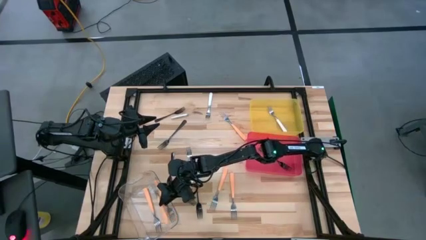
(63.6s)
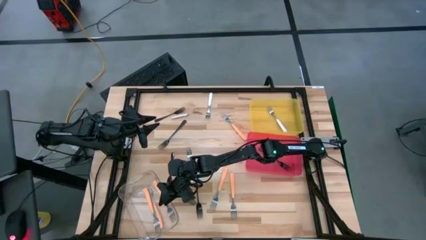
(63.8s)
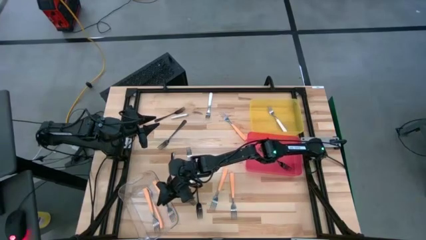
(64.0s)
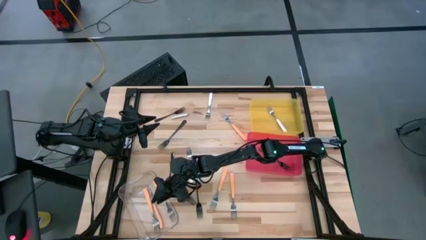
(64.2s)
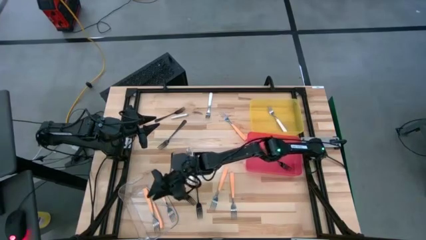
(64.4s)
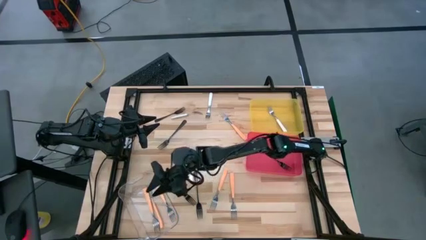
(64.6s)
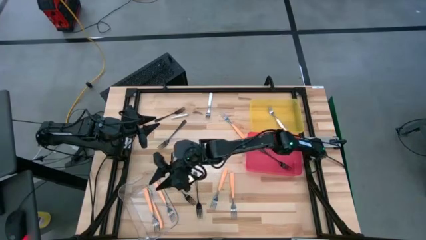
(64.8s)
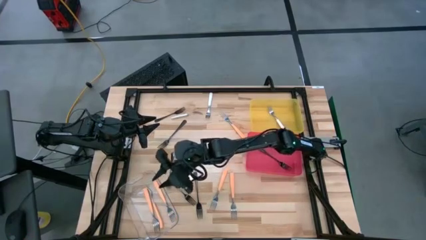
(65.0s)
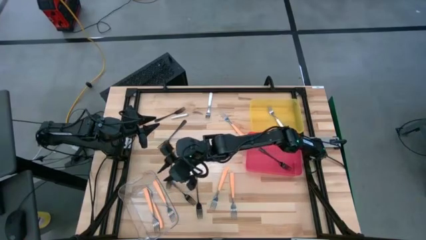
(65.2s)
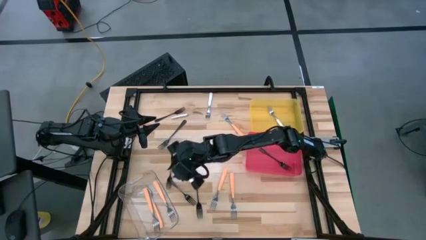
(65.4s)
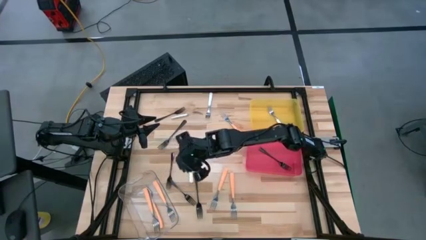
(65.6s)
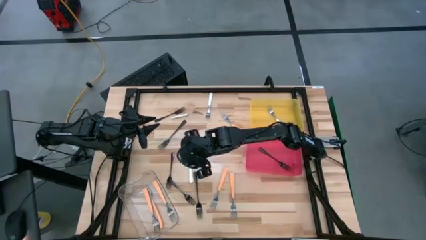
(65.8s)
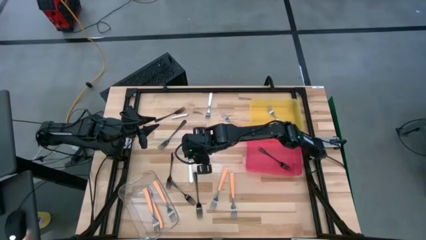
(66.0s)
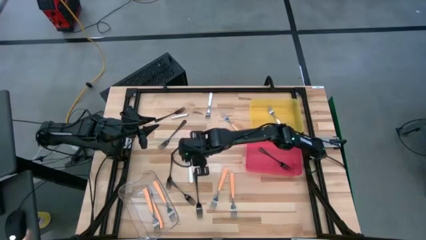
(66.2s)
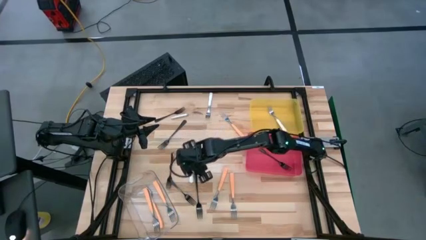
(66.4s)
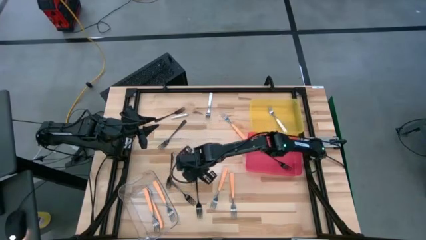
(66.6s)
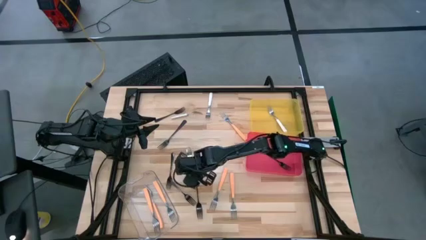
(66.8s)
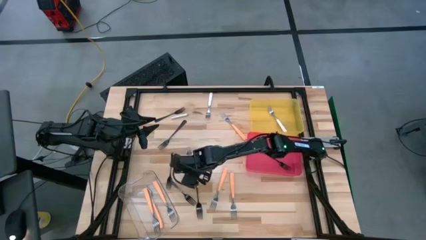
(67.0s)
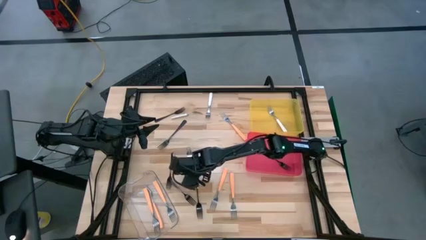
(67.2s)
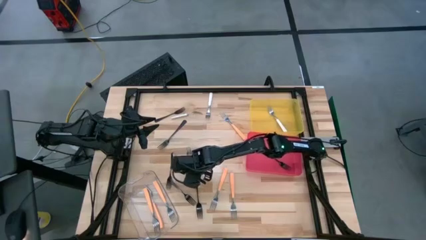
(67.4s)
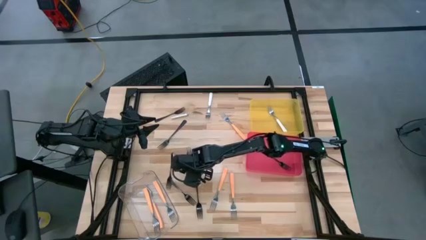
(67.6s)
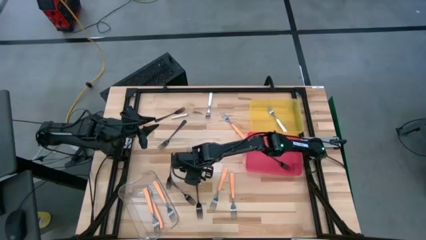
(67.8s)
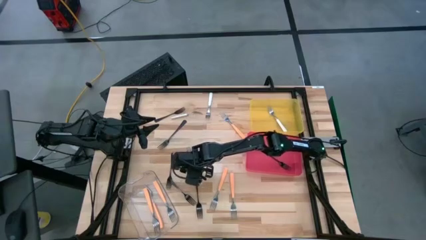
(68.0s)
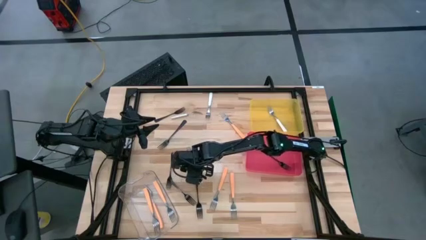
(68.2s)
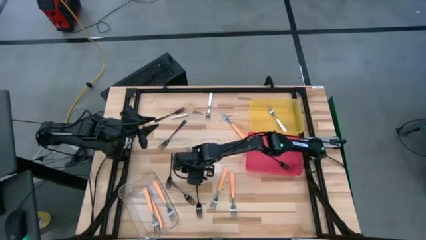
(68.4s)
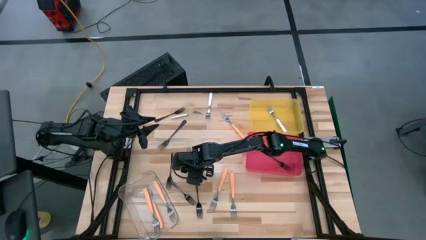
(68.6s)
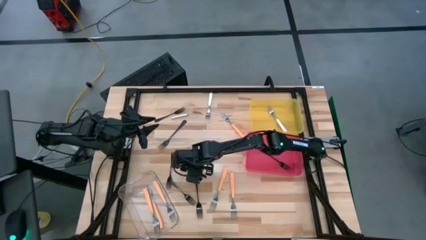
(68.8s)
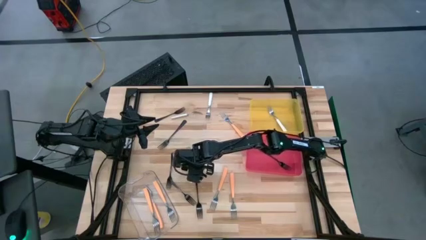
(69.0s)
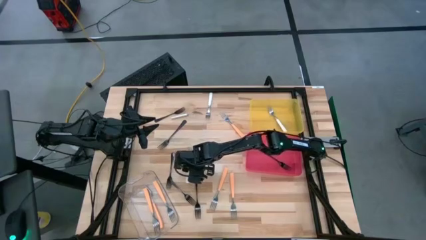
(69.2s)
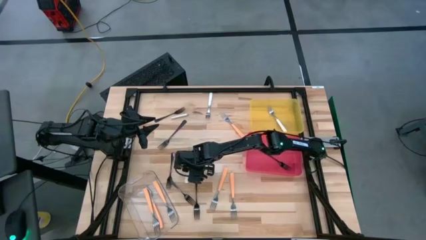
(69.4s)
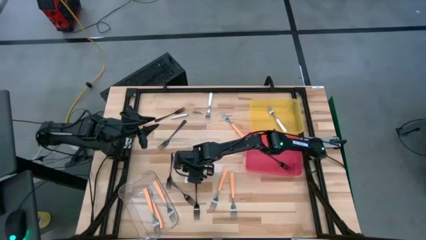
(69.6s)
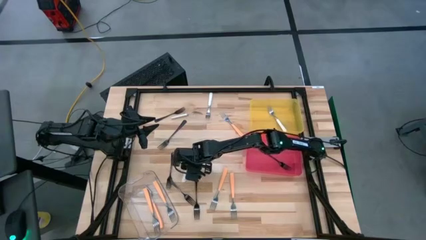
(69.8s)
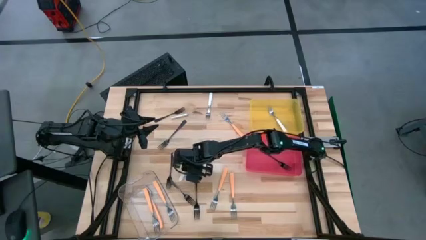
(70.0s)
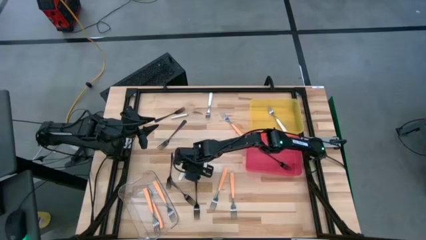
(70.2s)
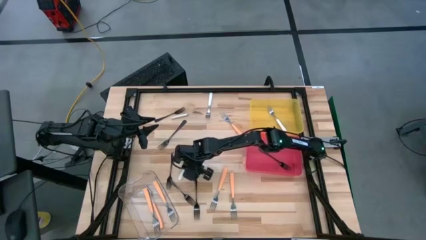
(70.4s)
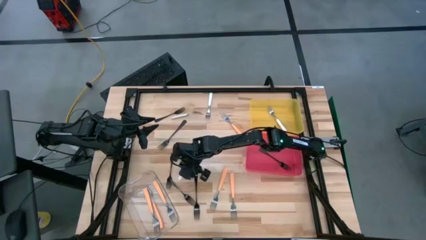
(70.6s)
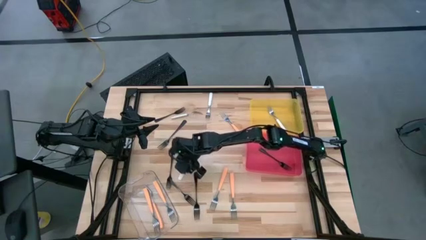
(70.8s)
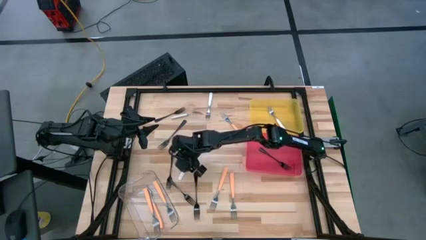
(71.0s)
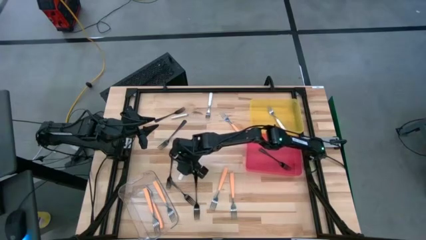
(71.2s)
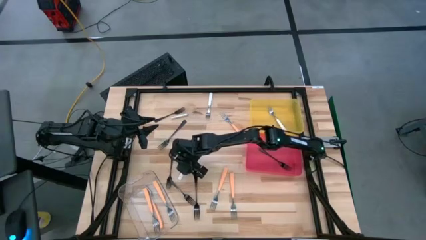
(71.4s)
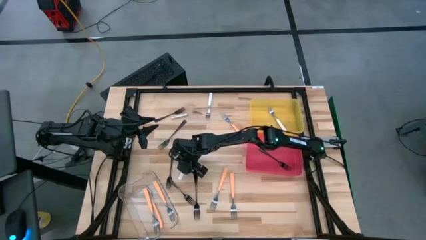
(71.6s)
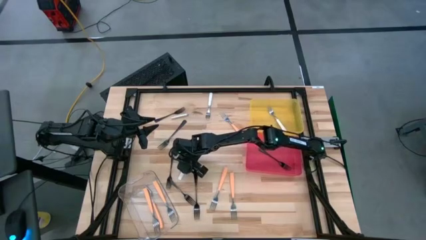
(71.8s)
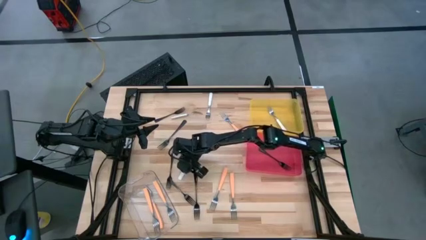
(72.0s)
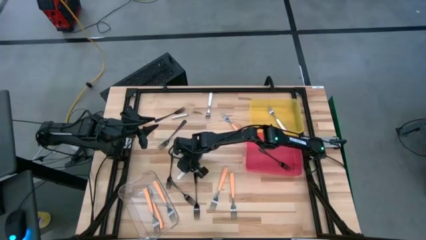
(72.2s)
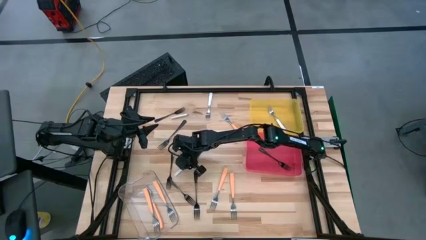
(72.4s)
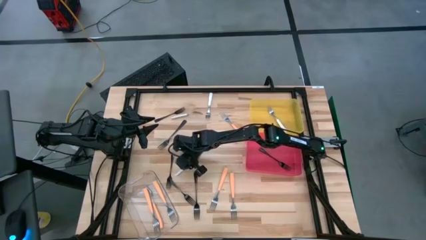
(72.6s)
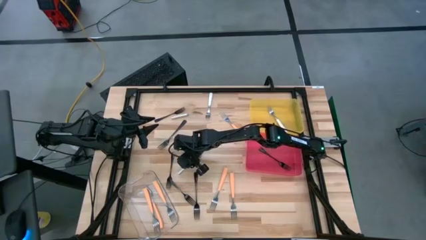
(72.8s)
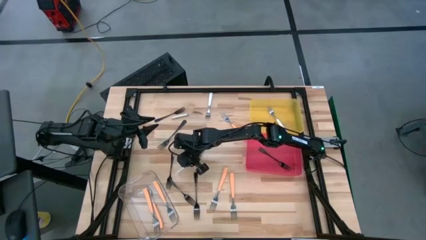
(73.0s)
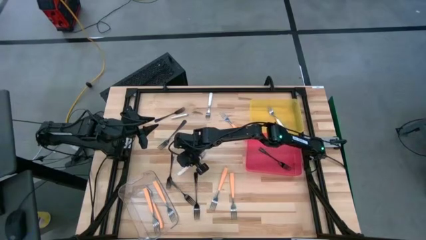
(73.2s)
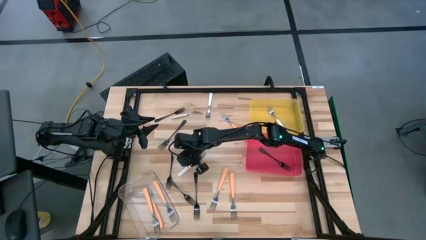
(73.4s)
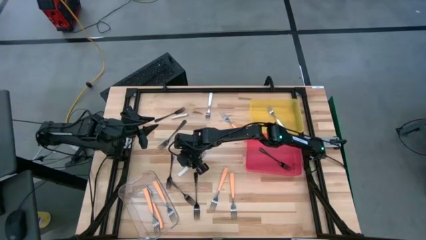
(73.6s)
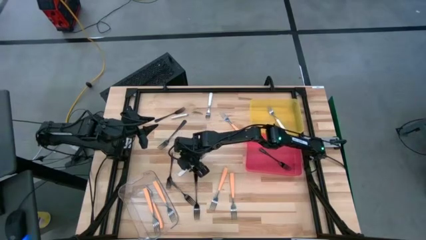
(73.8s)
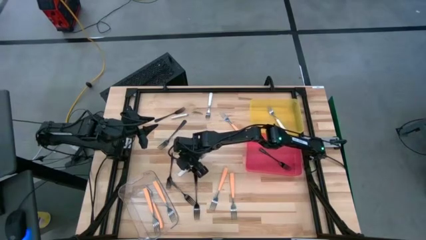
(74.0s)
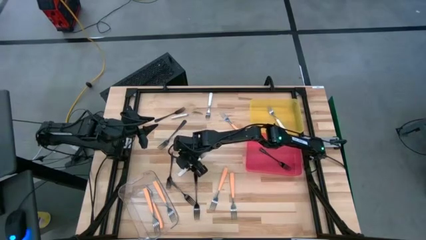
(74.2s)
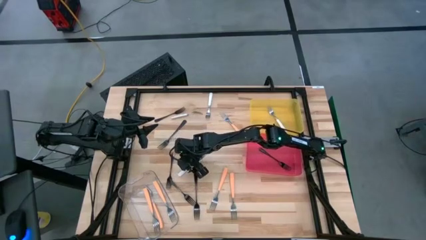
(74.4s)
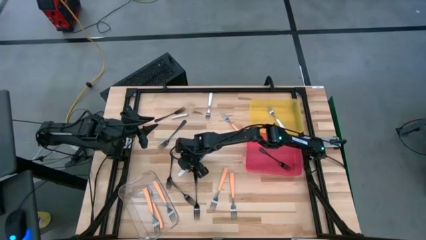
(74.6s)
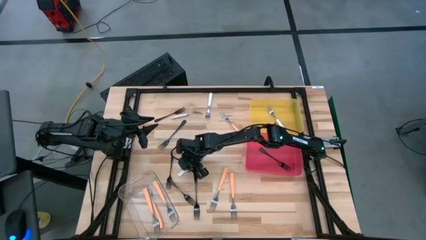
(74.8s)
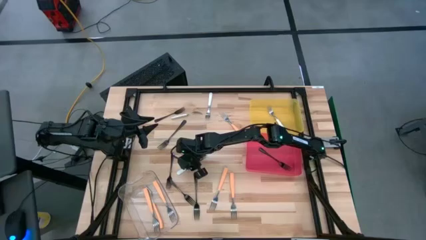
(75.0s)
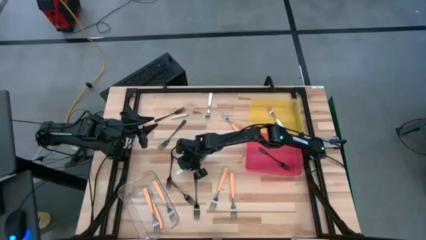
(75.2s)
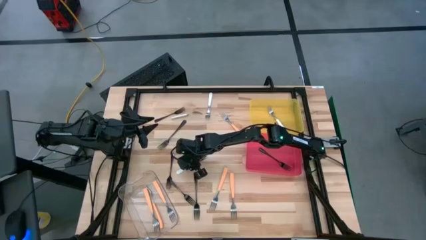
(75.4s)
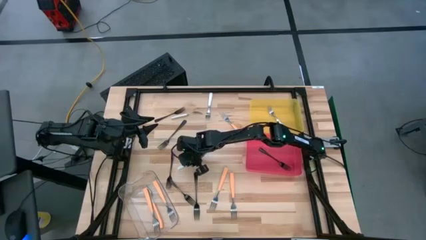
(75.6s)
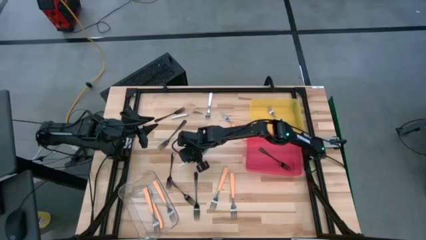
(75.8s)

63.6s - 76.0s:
Task: Sort silverware by color (type)
Put the white fork into the yellow bin
